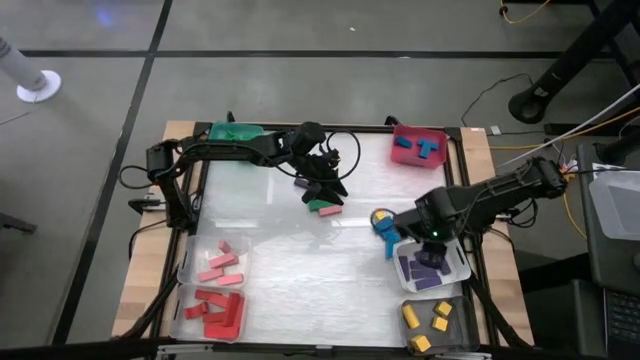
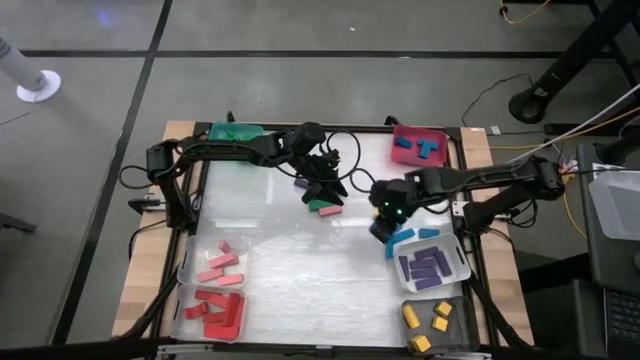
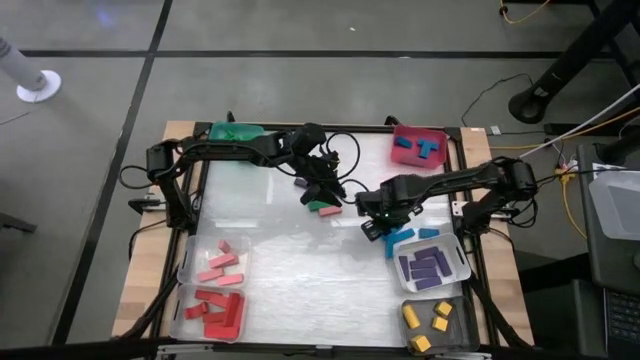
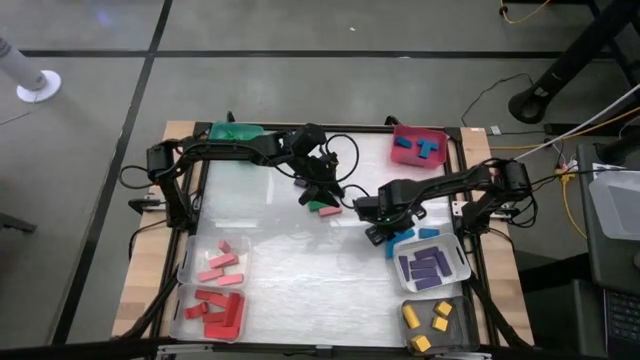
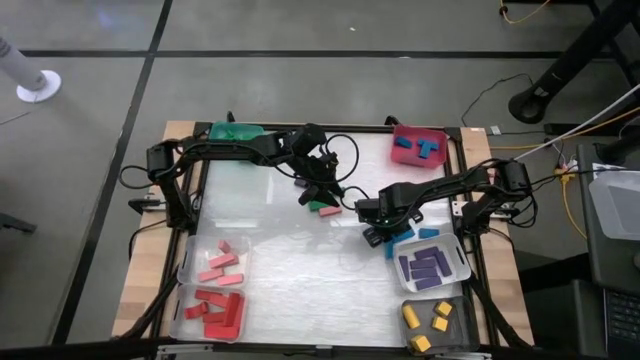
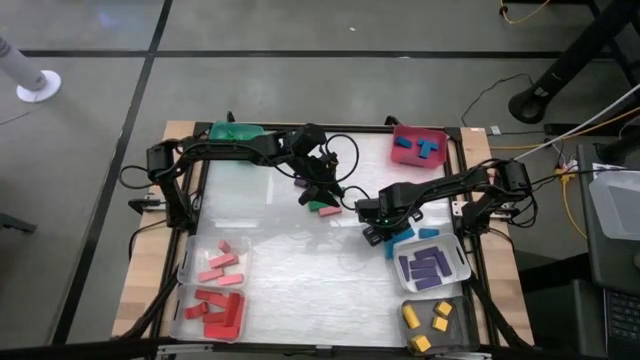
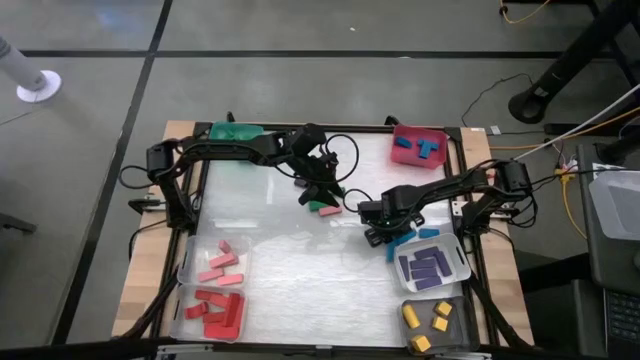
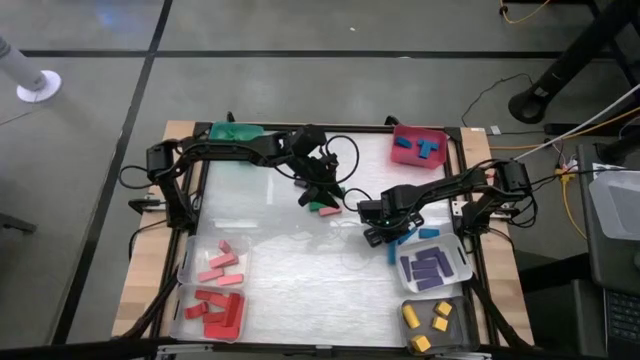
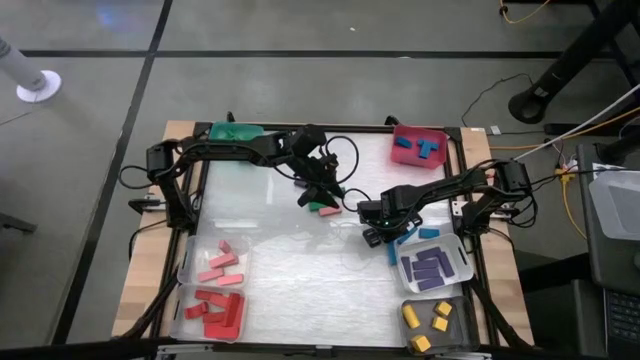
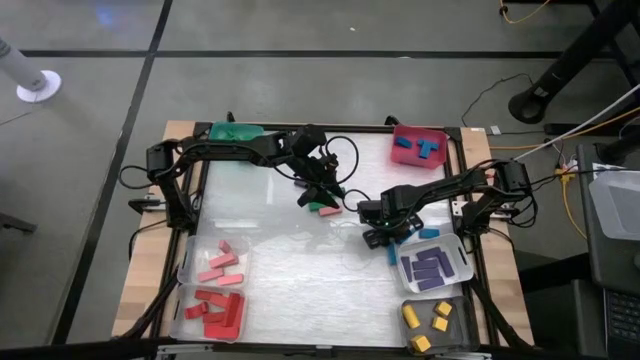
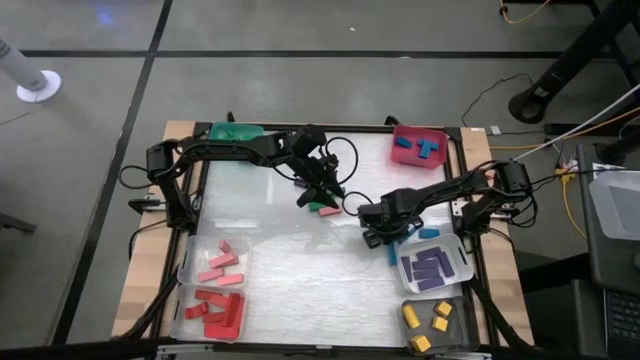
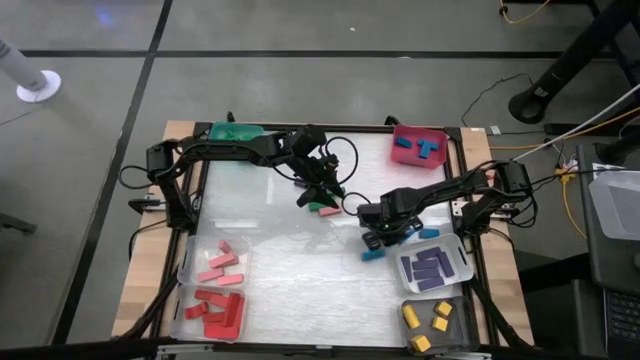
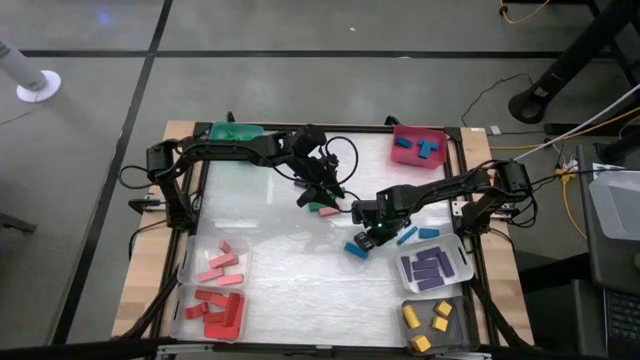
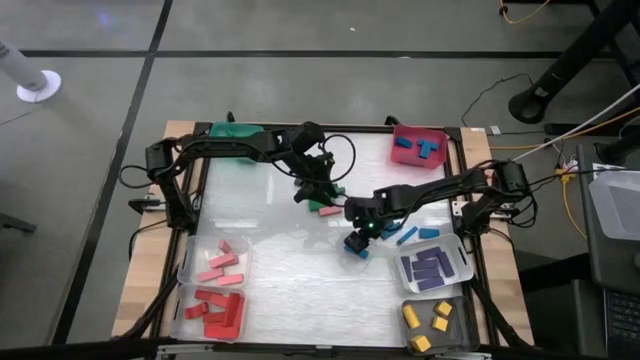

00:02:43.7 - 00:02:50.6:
Task: Sort blocks
Put the blue block into the pink bin

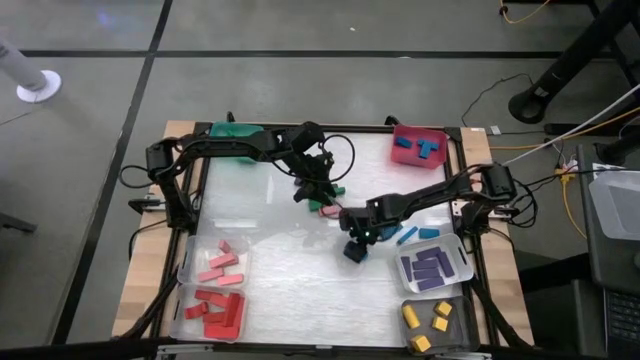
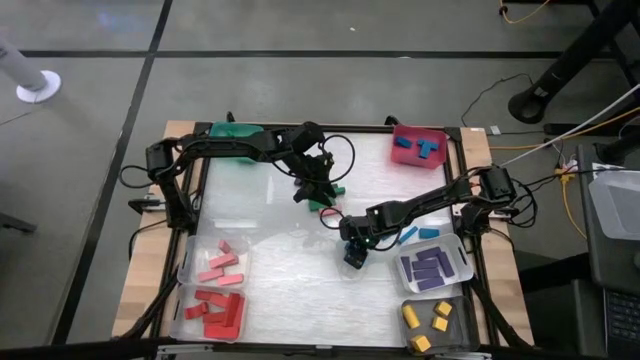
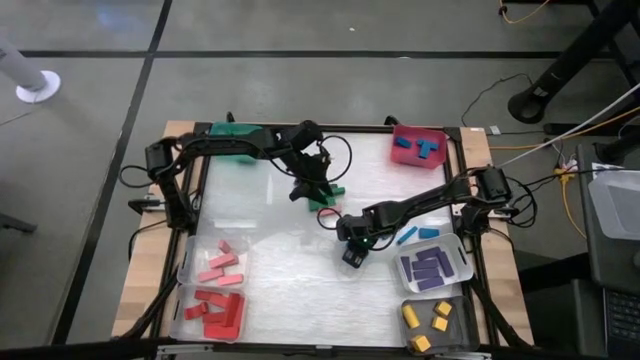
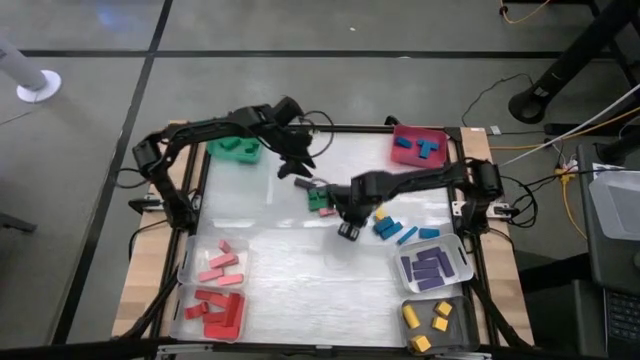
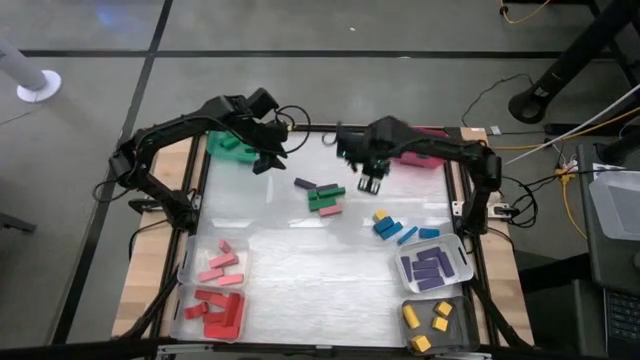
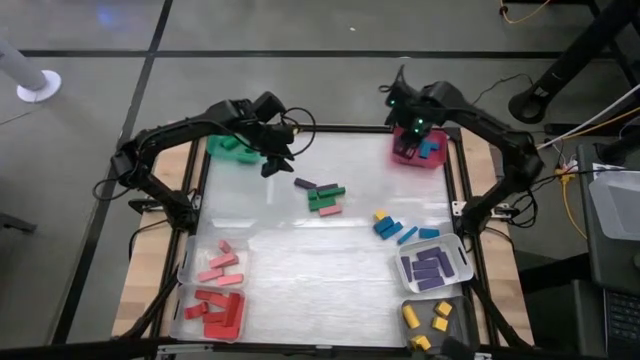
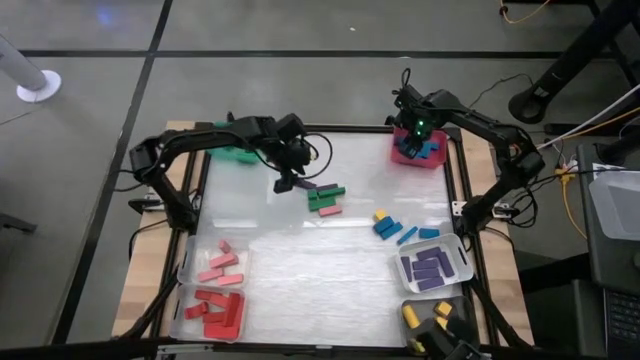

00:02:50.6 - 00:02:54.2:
Put the blue block into the pink bin

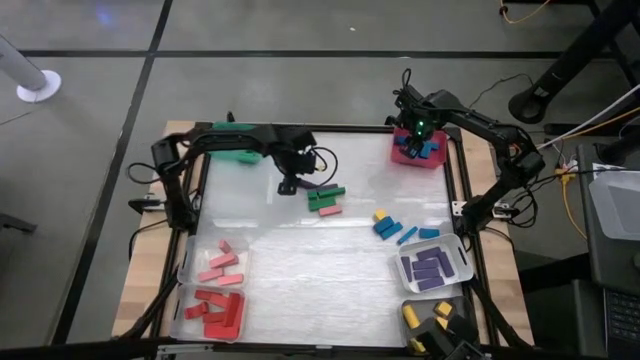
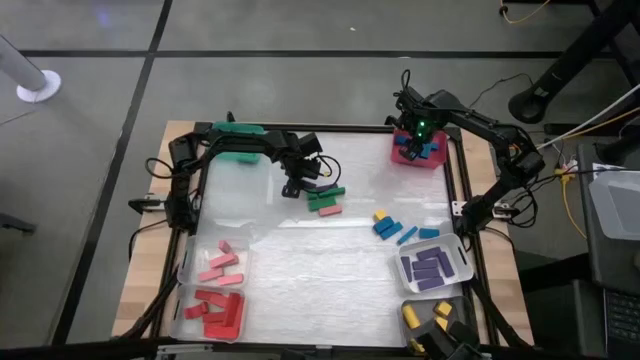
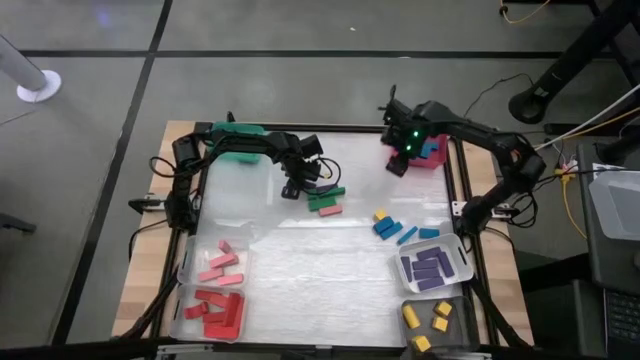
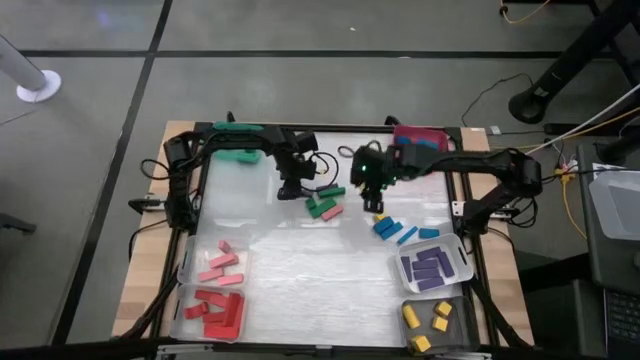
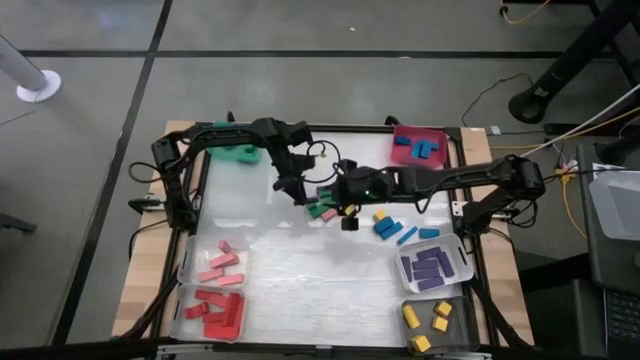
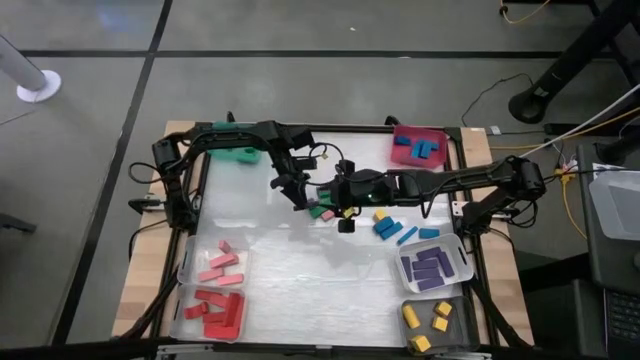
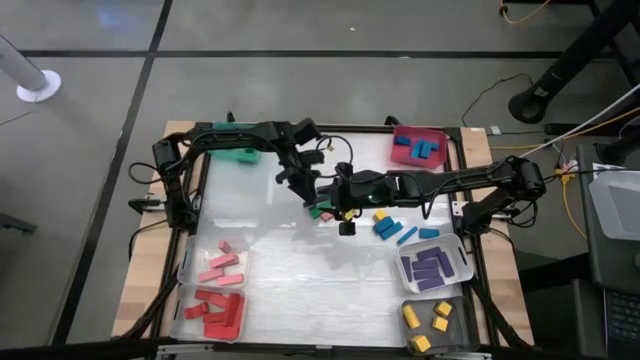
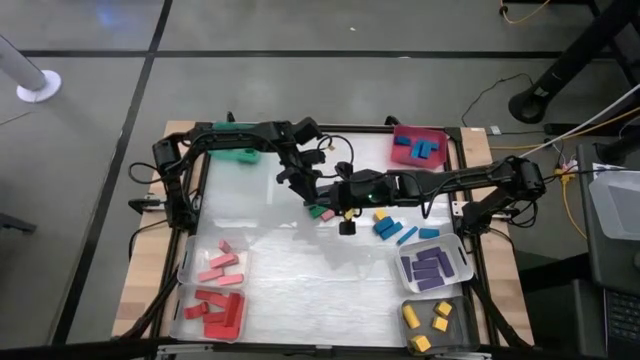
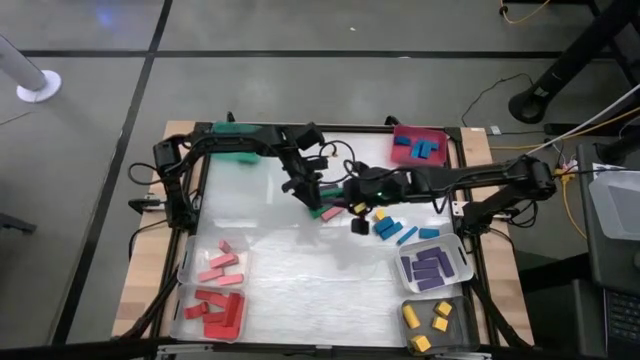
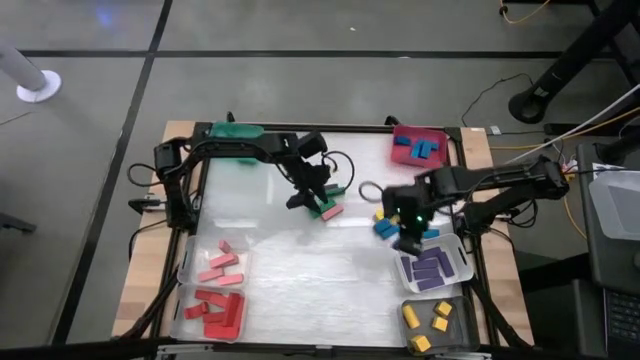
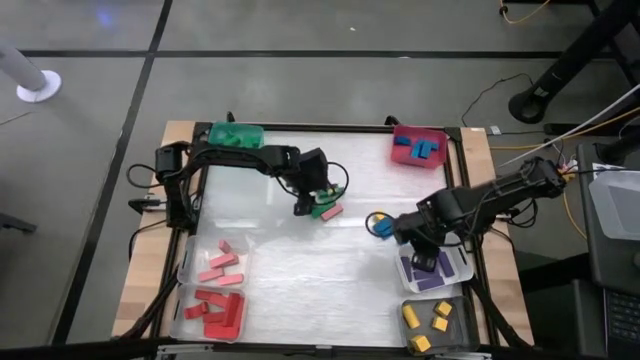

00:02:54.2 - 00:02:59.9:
Put the violet block into the white bin

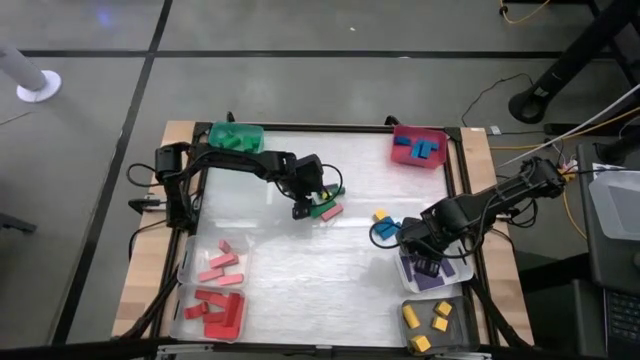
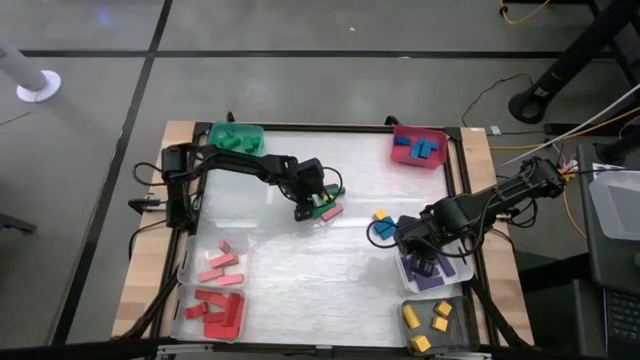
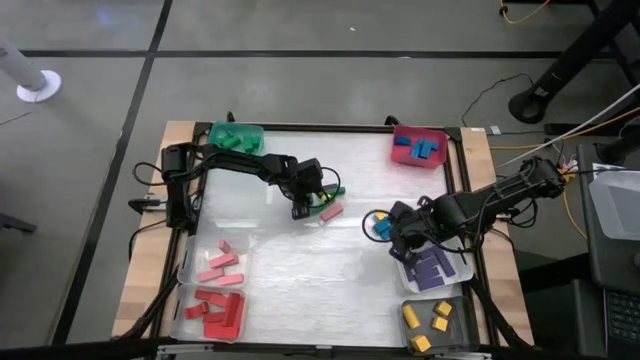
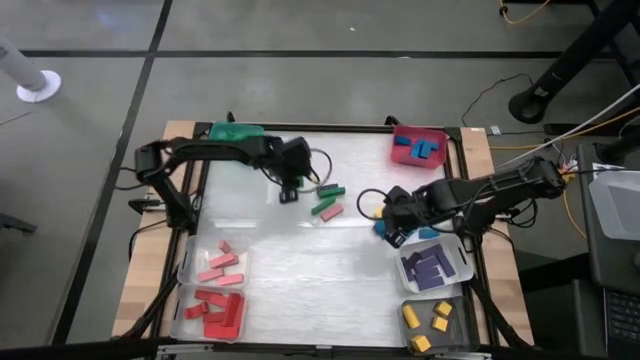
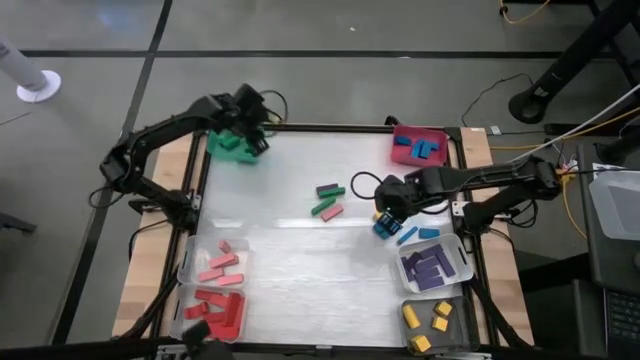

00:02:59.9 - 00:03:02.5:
Put the green block into the green bin

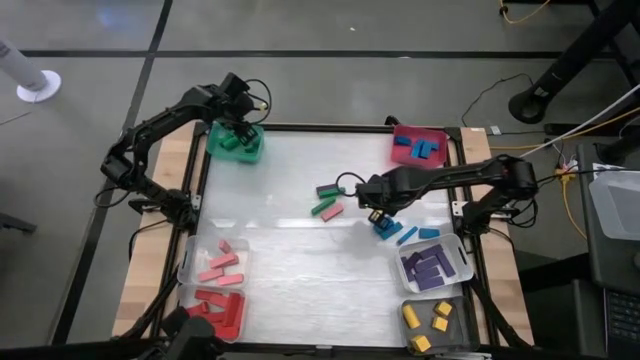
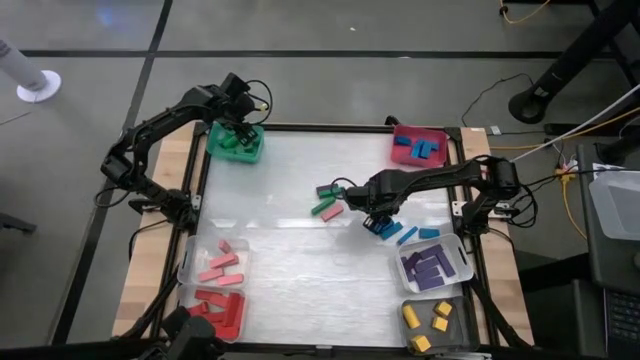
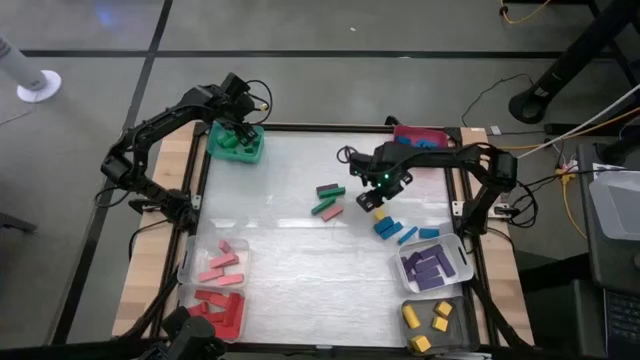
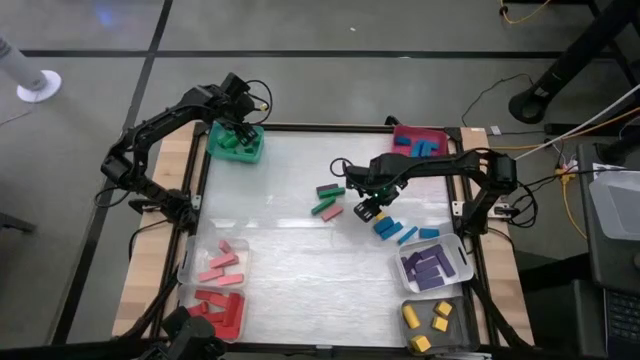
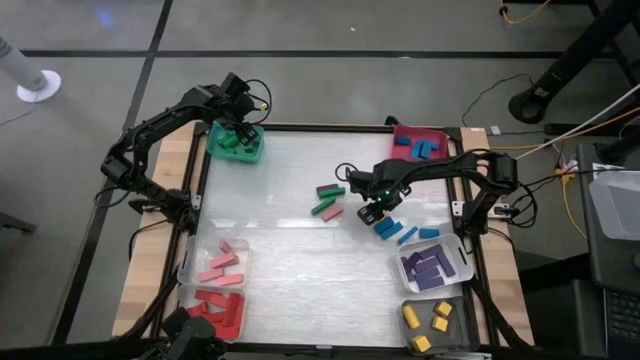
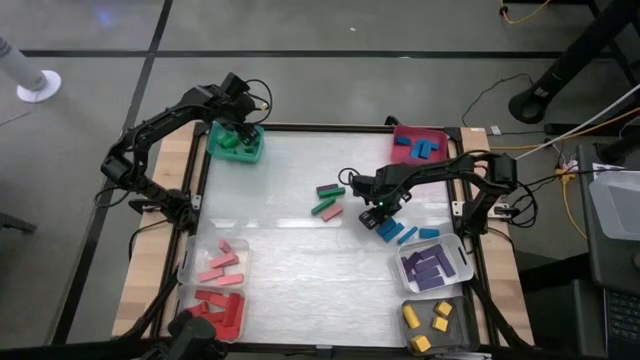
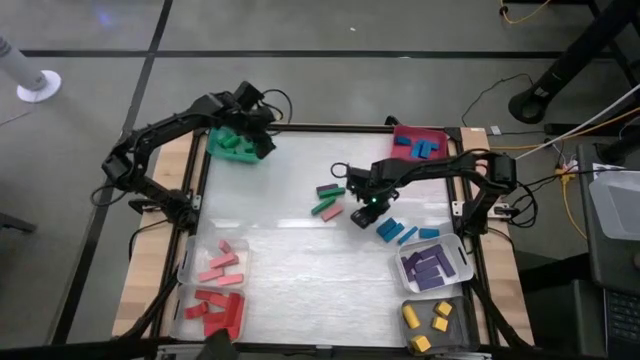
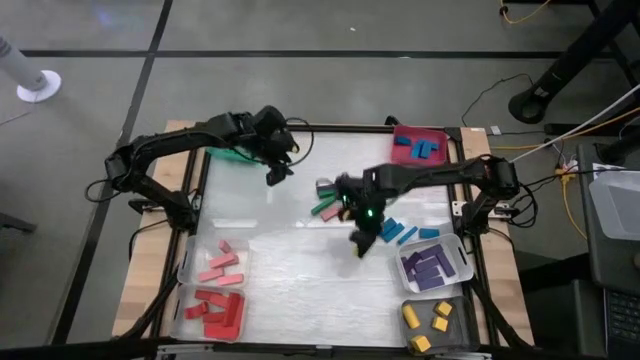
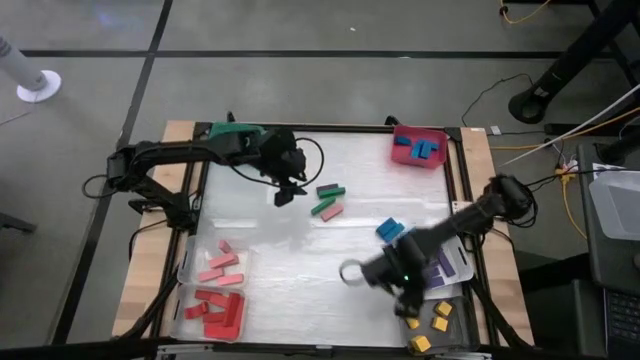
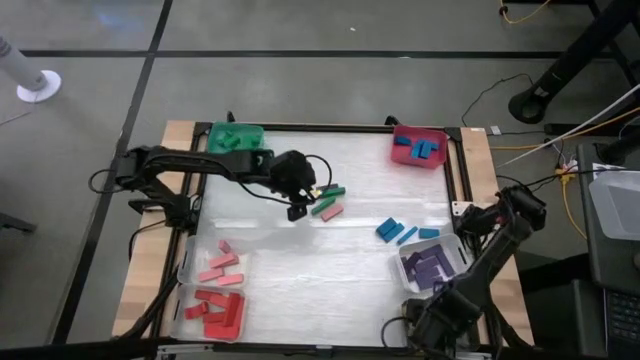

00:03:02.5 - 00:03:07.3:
Put the yellow block into the black bin
